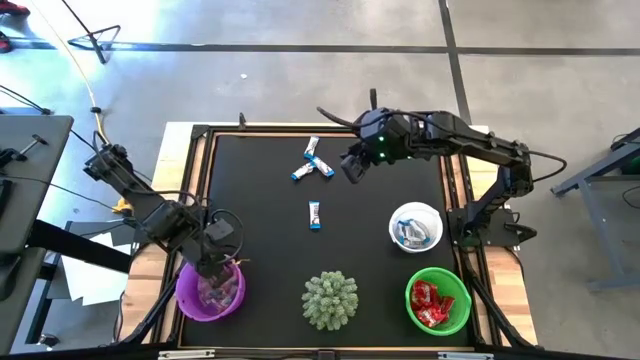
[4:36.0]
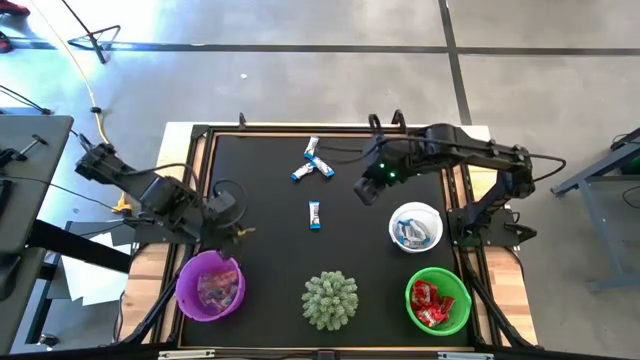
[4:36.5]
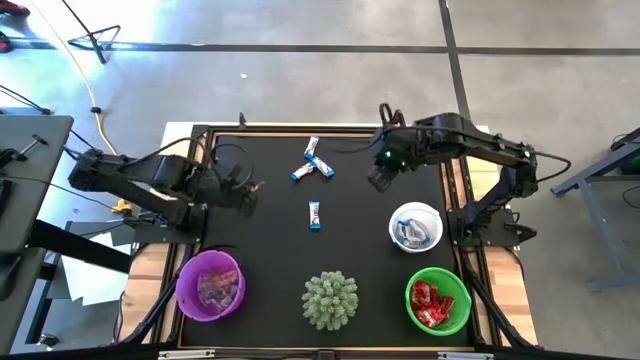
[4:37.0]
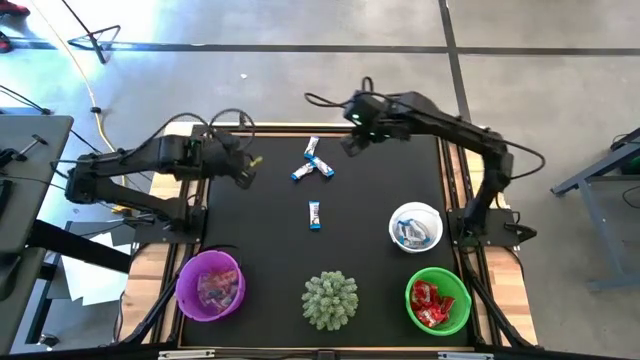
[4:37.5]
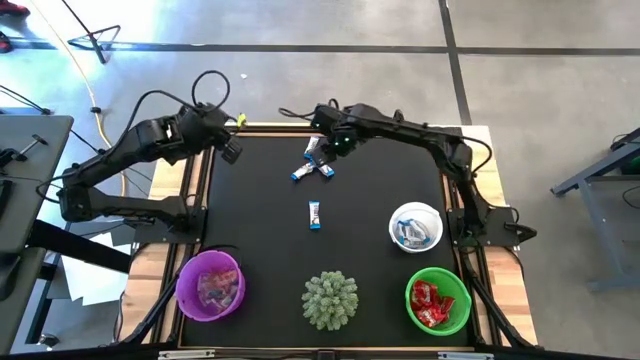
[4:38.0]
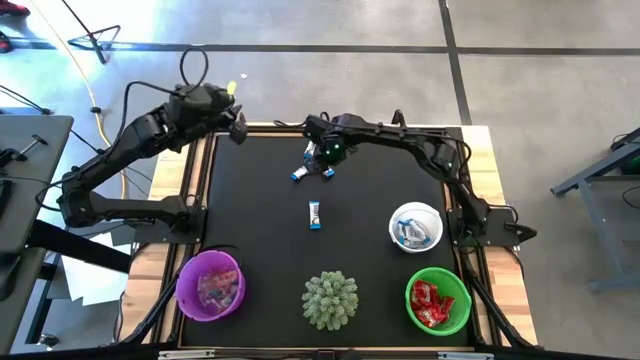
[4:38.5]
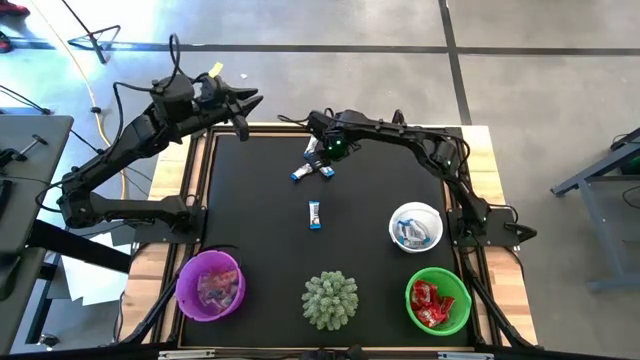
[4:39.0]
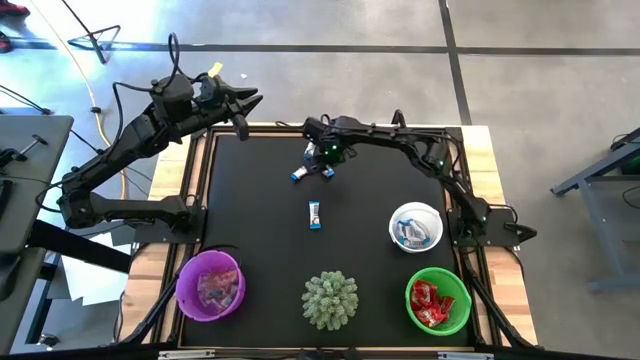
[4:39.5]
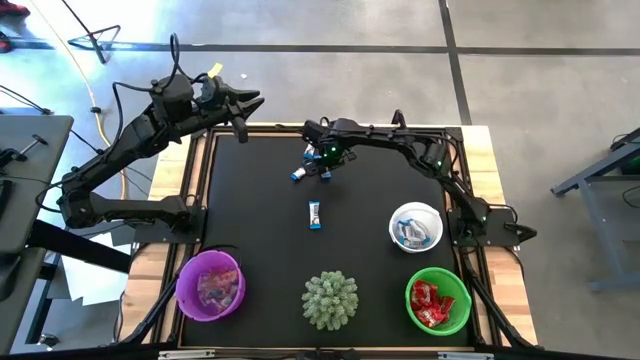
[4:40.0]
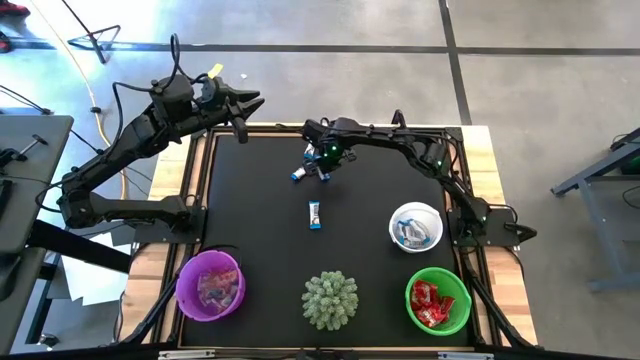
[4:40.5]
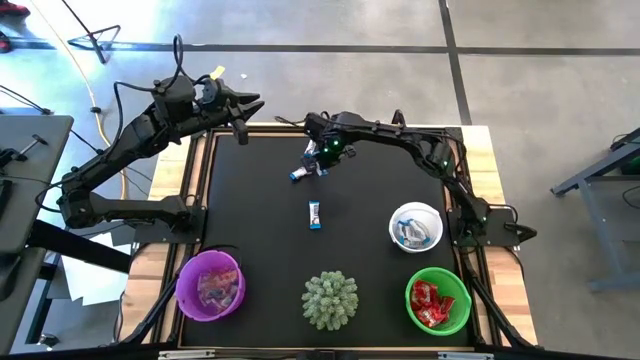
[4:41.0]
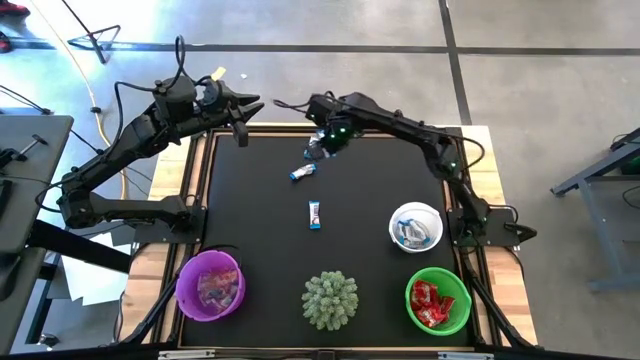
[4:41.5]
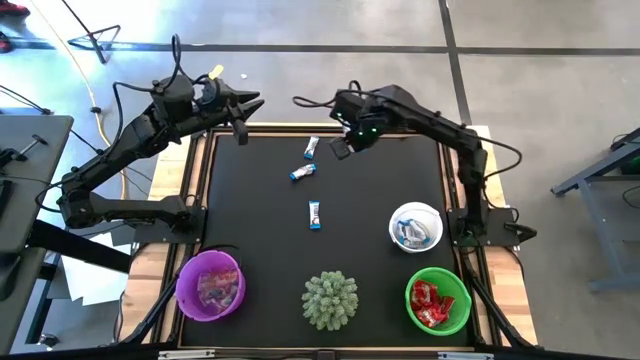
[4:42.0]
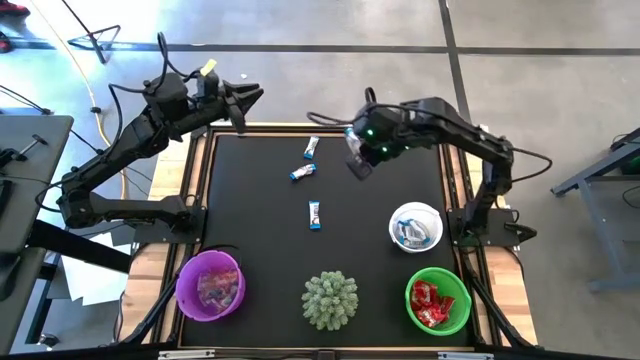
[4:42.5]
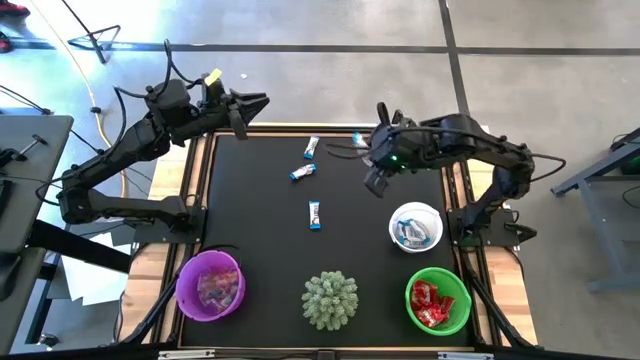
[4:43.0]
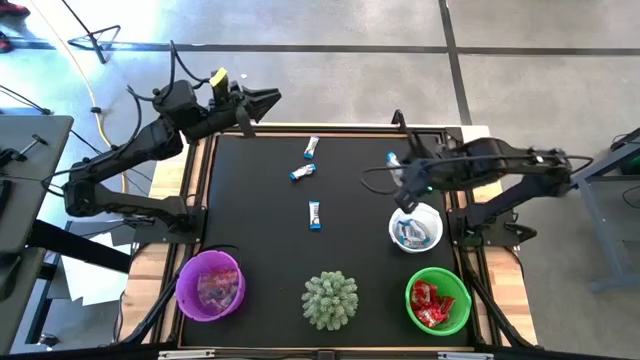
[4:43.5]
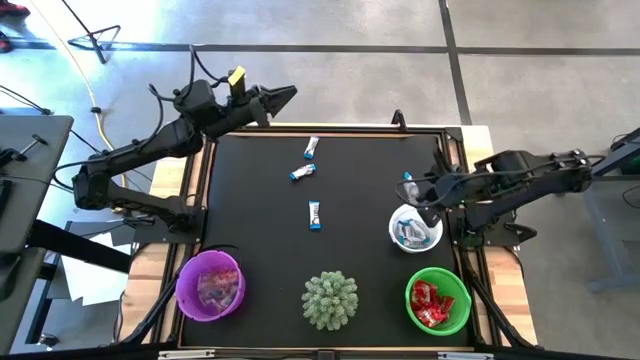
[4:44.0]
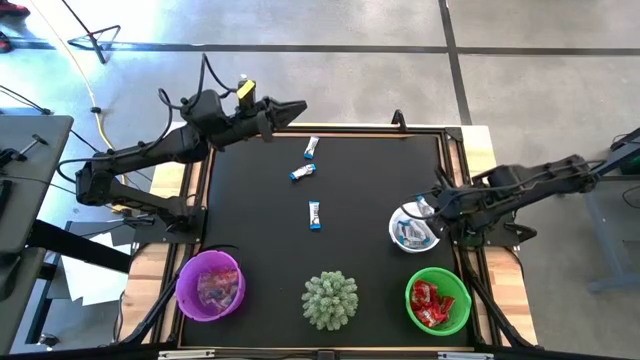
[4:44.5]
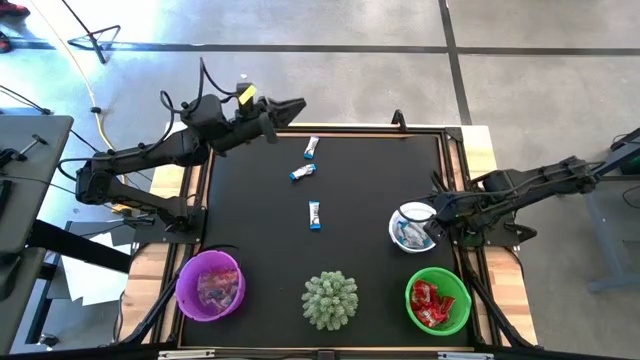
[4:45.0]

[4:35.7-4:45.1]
Task: Sort candy
Put the white candy wrapper into the white bucket

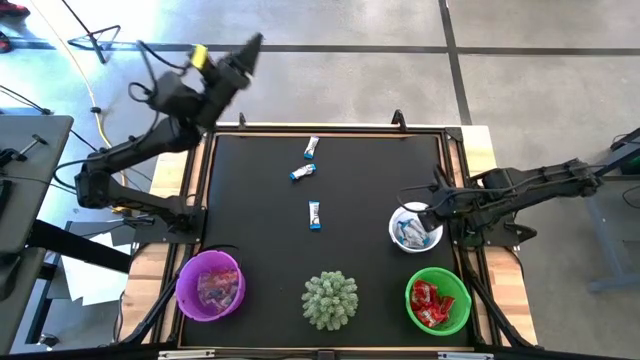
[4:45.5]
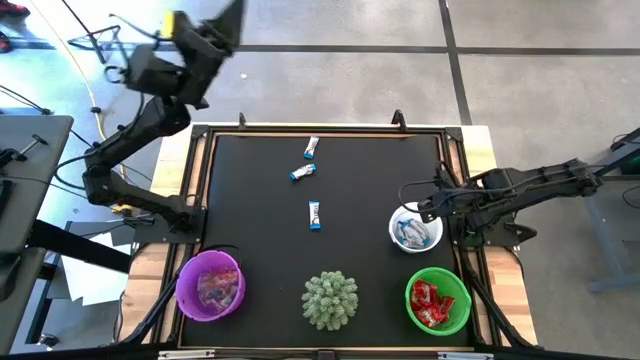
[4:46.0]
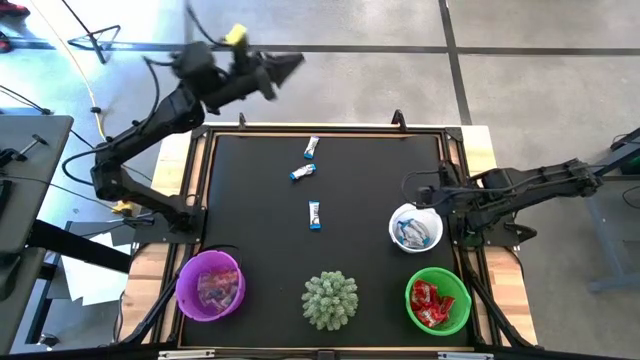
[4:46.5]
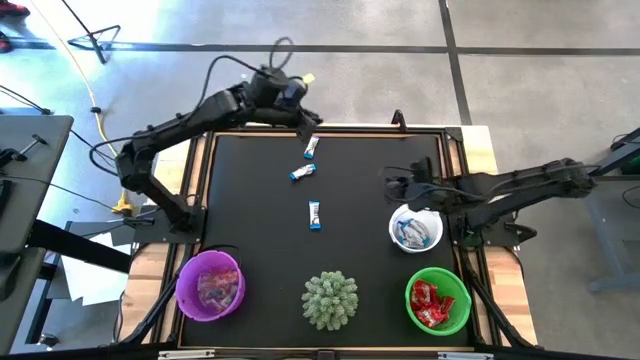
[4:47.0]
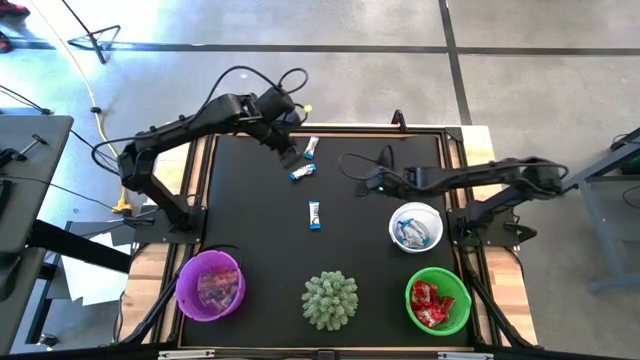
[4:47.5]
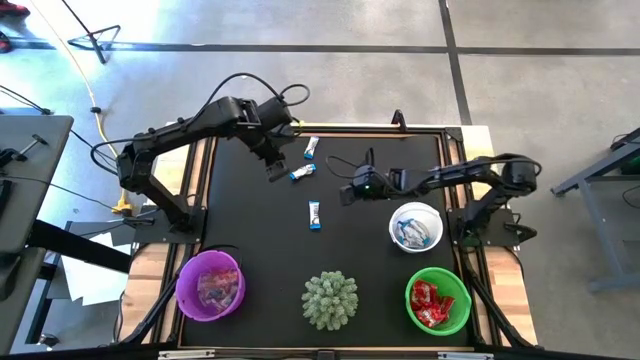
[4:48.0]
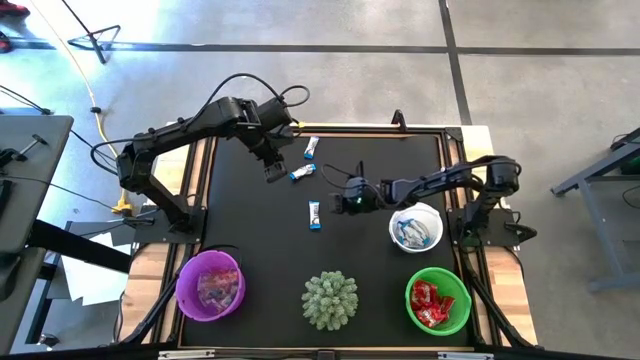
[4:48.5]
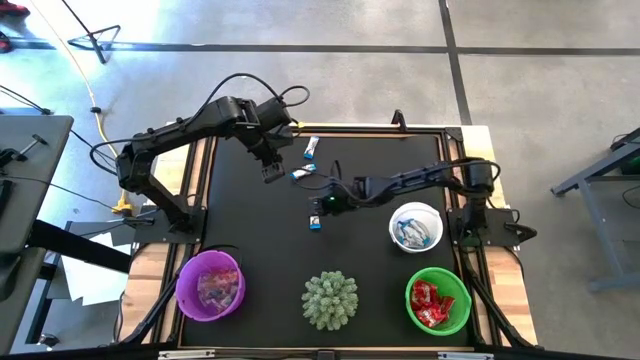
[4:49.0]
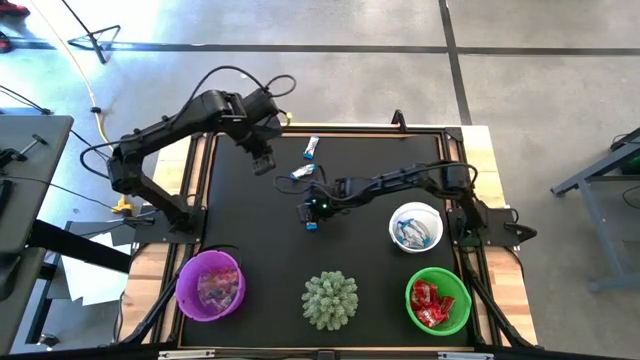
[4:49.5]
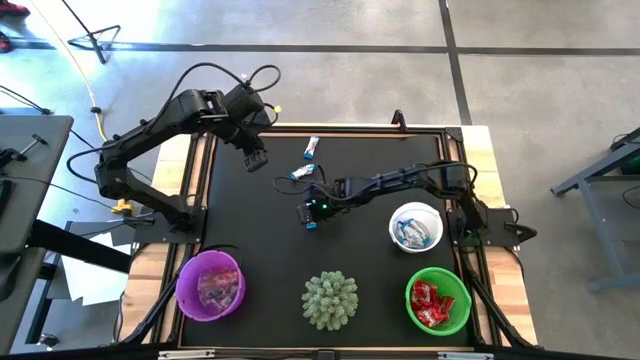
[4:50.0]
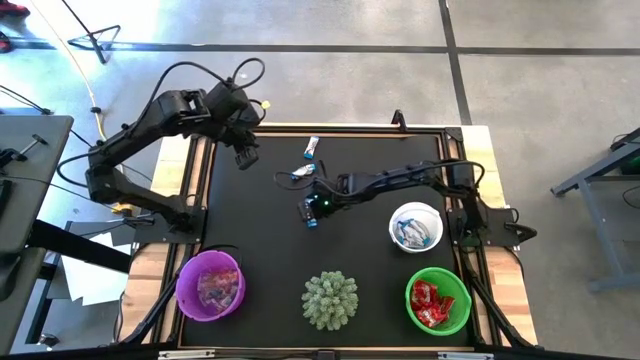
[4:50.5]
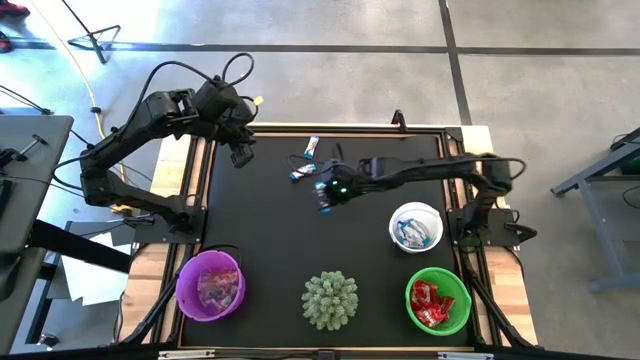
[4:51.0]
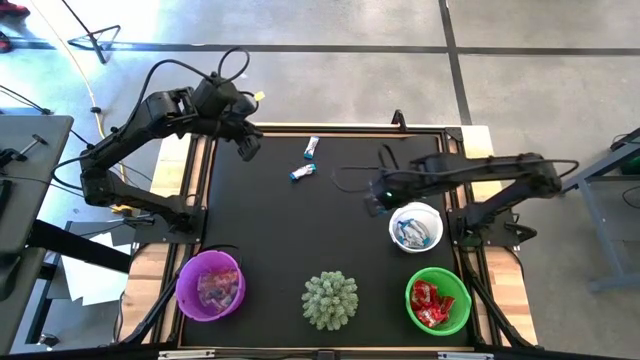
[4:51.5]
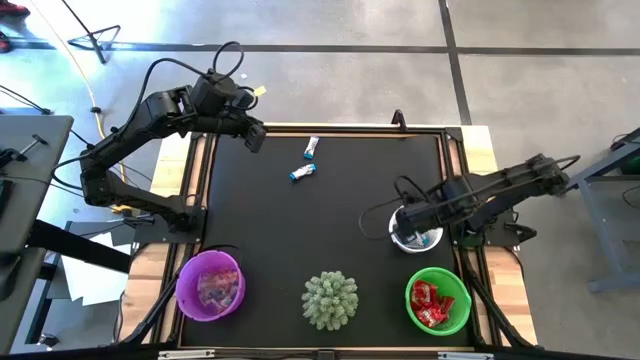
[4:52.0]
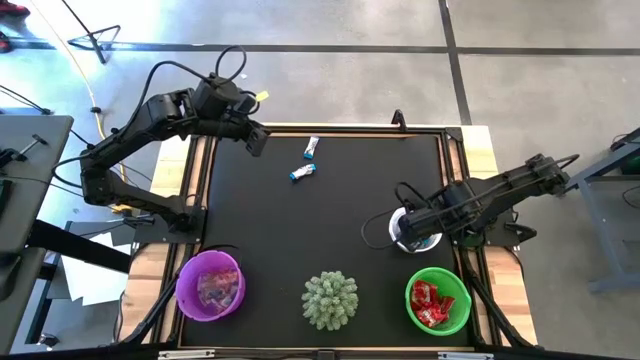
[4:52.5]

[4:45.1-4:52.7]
Put the white candy wrapper into the white bucket

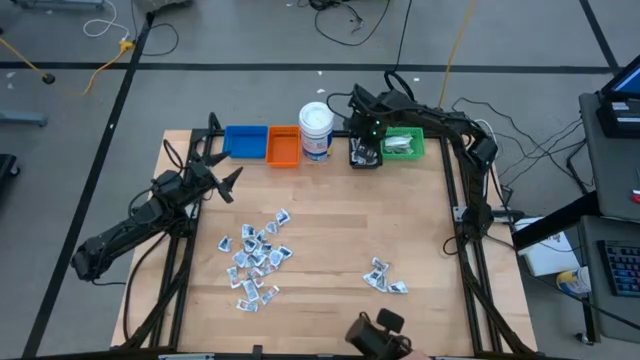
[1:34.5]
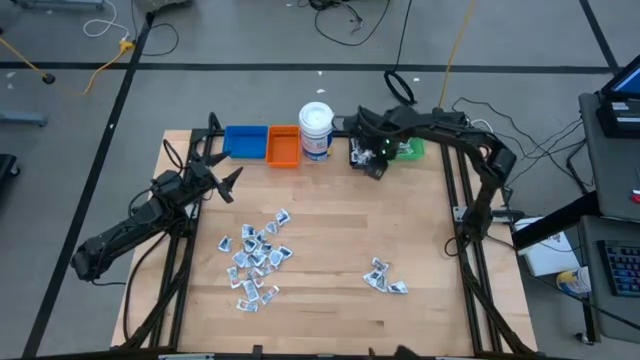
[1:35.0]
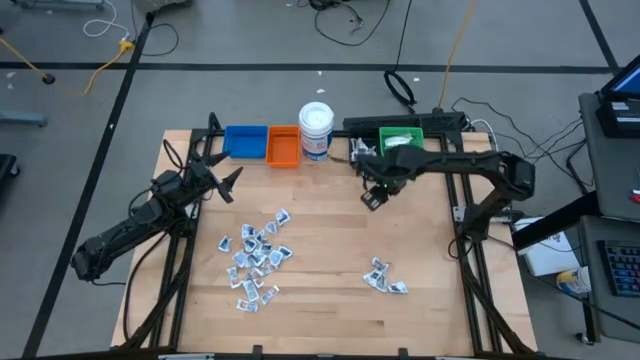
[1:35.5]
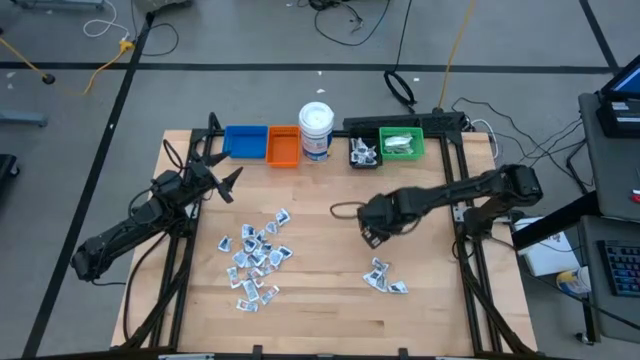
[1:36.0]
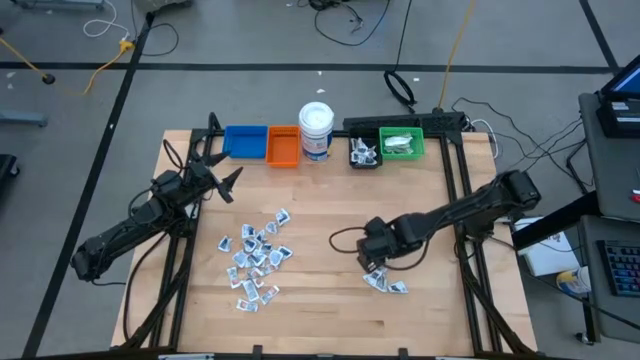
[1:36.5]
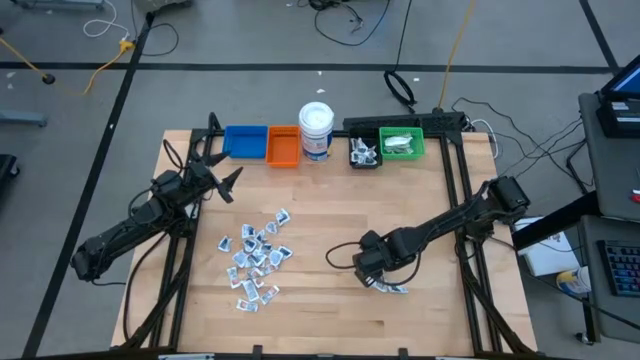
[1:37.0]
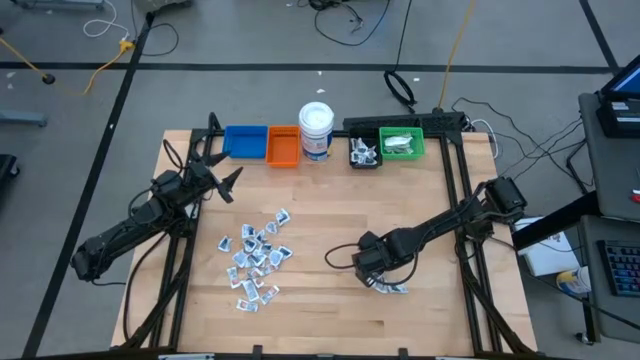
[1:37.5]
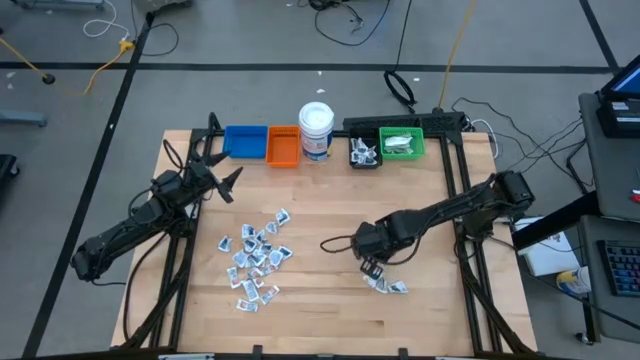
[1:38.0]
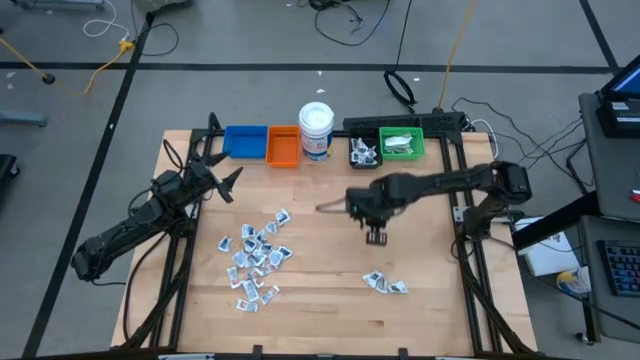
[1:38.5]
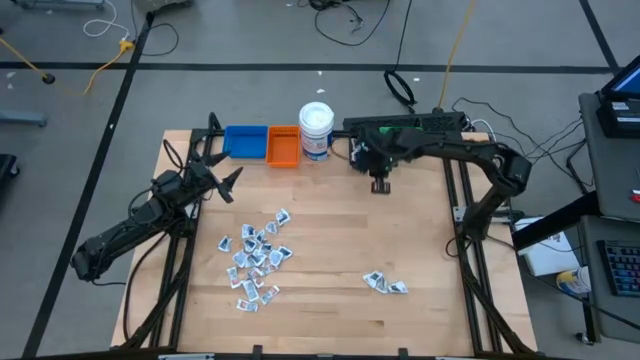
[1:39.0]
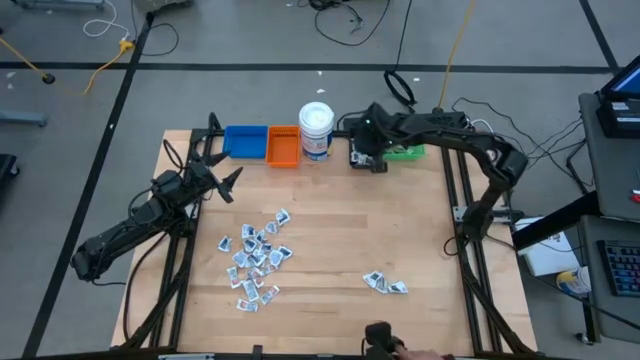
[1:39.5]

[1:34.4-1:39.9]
Task: Pick & Place First Aid Supplies
Put the towelette pack into the black bin
